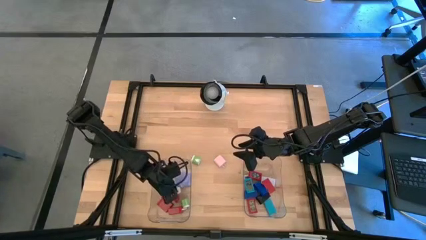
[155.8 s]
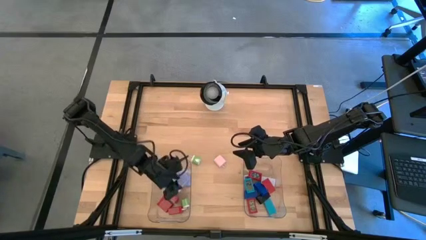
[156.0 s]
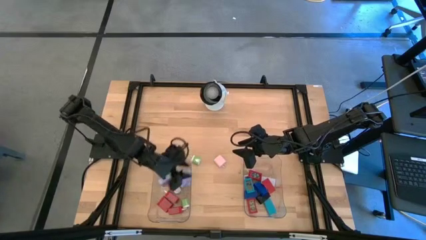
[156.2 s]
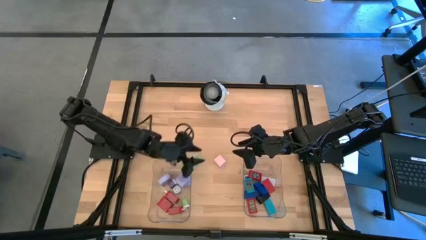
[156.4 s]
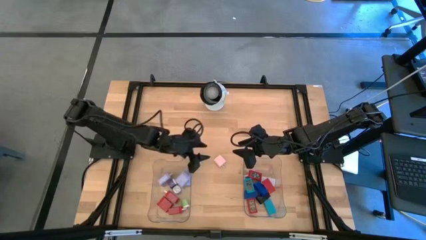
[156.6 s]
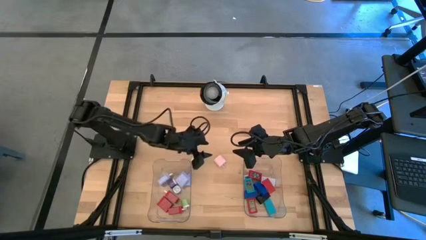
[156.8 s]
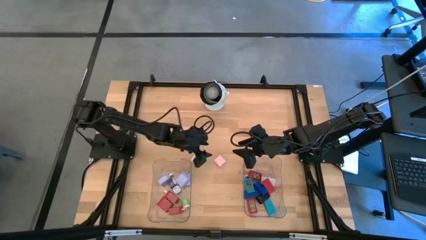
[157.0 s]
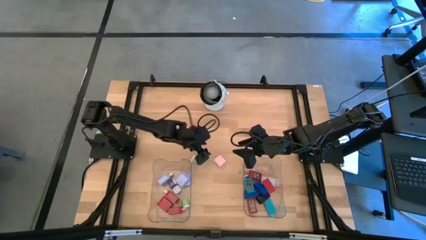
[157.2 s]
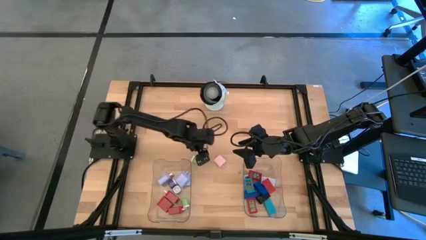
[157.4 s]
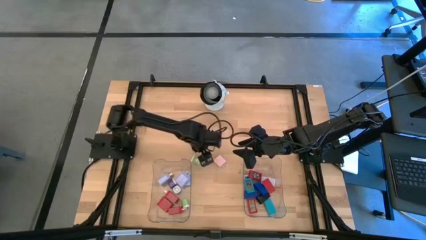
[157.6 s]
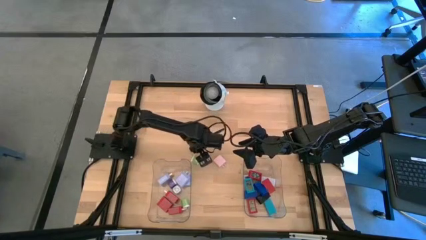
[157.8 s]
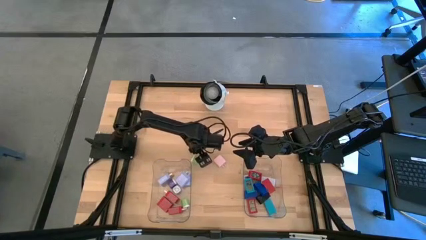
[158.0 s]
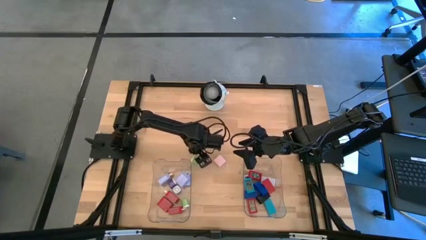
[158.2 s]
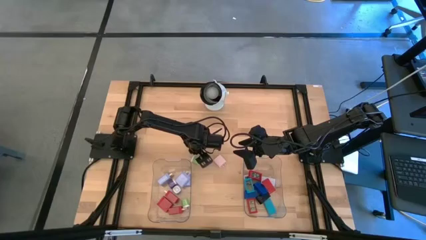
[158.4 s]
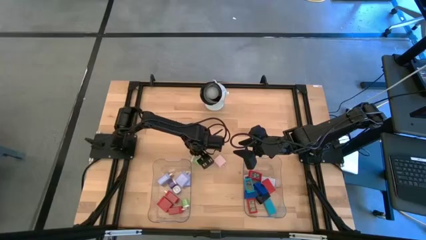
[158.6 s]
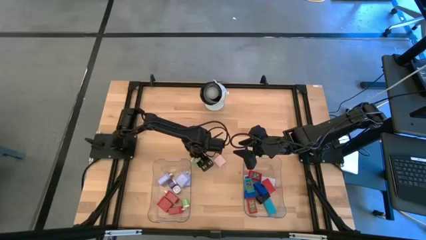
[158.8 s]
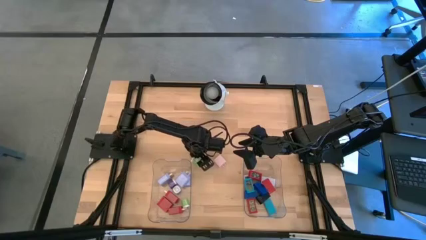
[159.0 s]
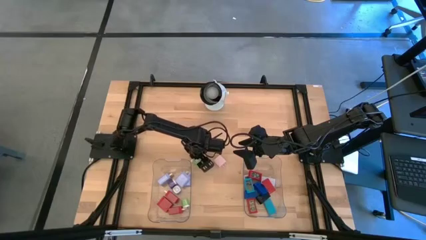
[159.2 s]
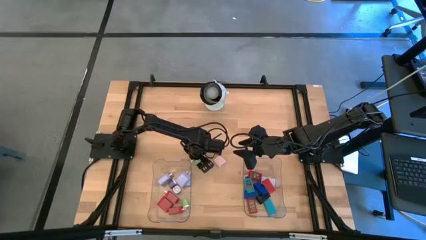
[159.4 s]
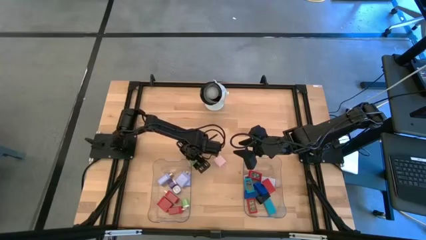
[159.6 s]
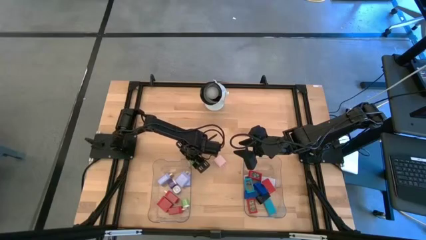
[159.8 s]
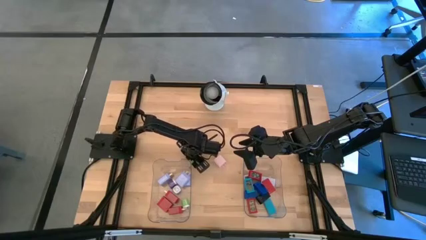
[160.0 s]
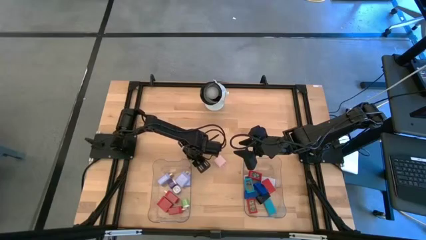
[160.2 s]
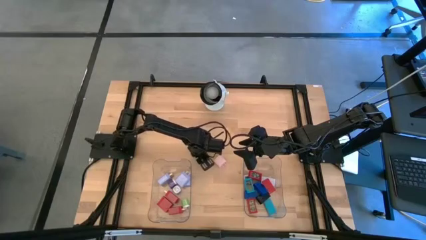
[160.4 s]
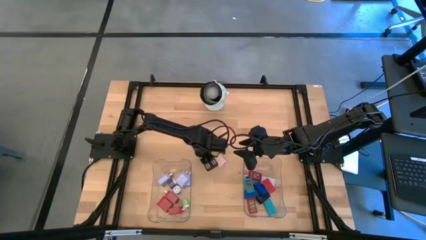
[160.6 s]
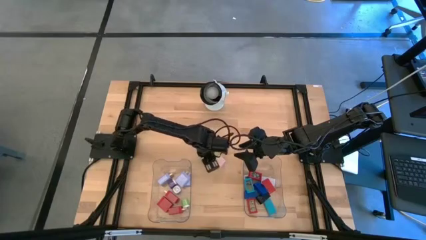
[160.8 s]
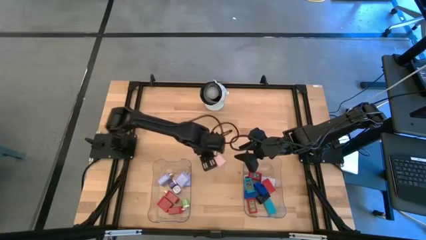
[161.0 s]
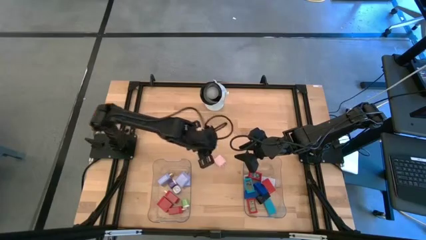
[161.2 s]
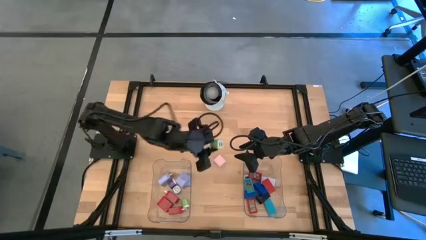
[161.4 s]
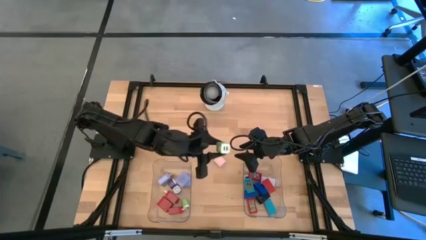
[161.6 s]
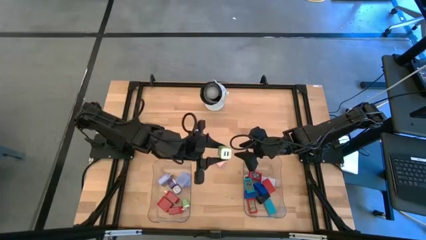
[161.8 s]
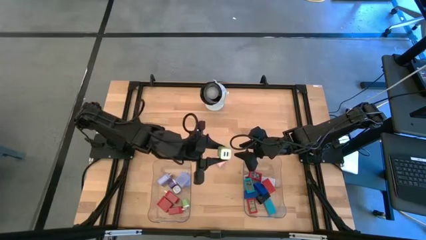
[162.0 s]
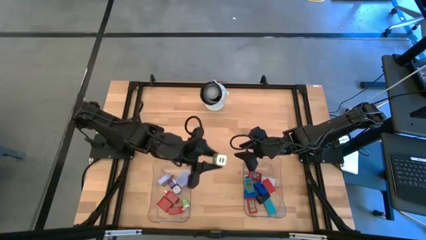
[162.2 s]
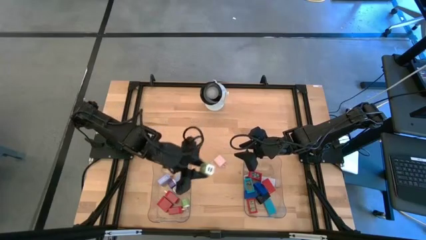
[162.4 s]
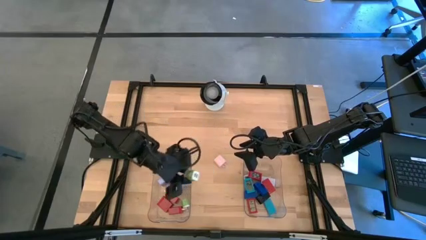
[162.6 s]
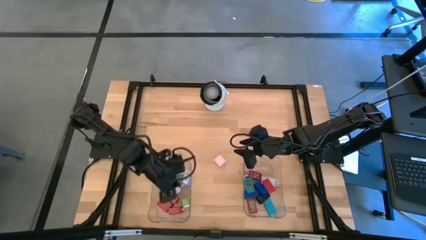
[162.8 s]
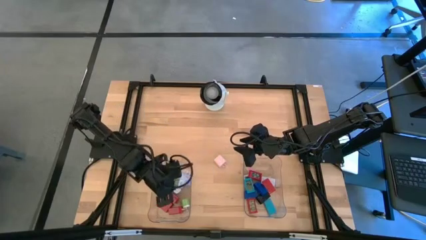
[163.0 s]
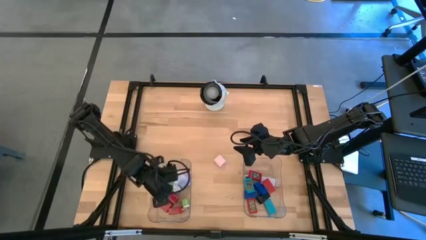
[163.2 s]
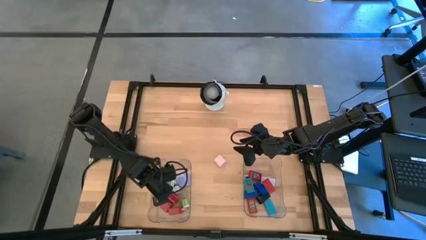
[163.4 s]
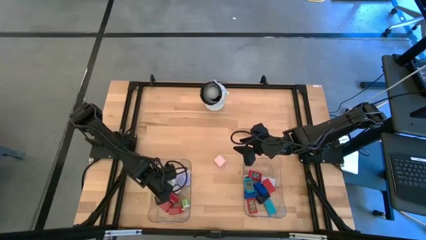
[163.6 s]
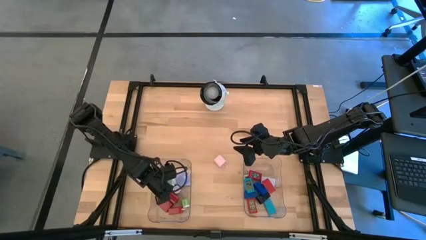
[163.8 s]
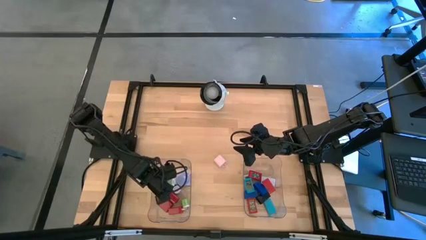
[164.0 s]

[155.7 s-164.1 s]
Task: Pick & Place Office items
Put the green charger adapter into the left transparent bin

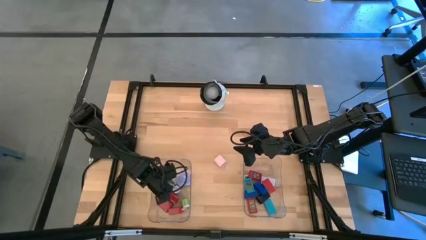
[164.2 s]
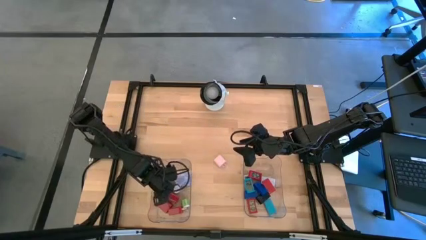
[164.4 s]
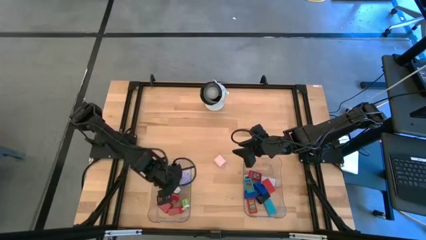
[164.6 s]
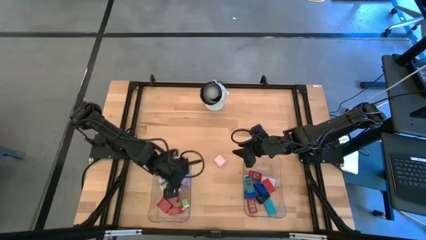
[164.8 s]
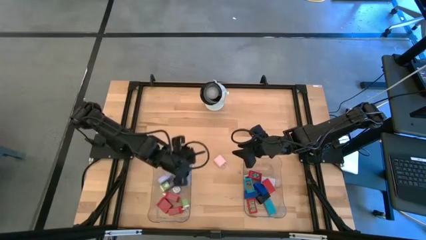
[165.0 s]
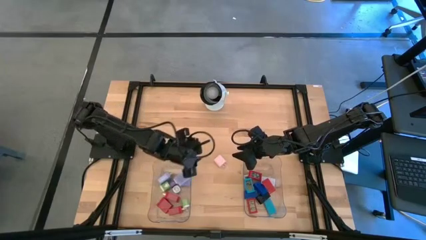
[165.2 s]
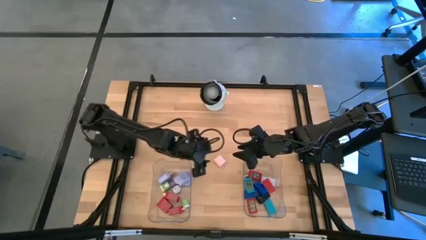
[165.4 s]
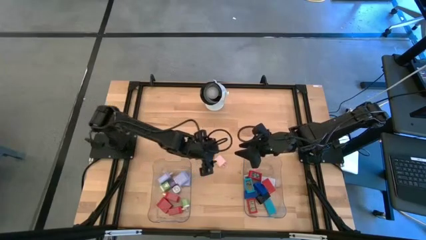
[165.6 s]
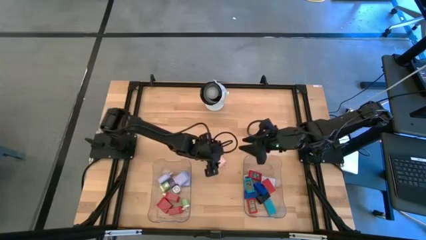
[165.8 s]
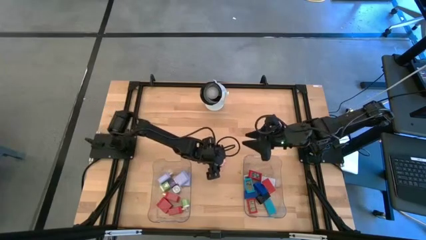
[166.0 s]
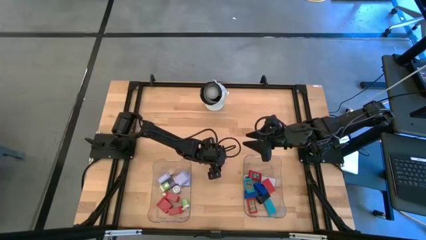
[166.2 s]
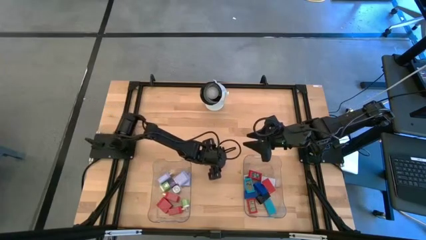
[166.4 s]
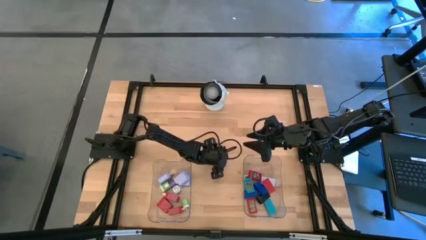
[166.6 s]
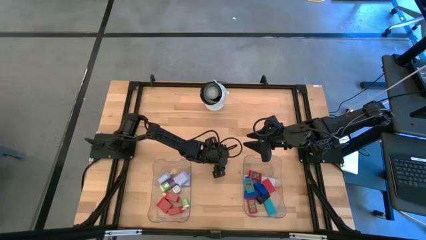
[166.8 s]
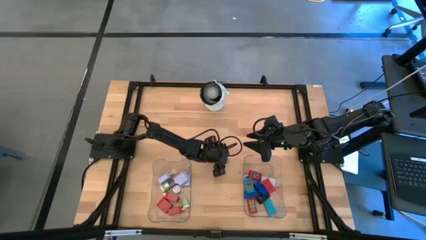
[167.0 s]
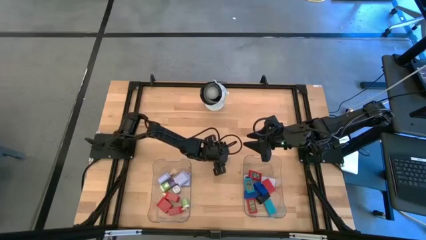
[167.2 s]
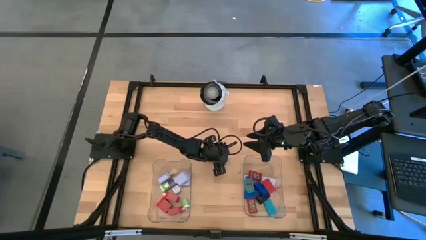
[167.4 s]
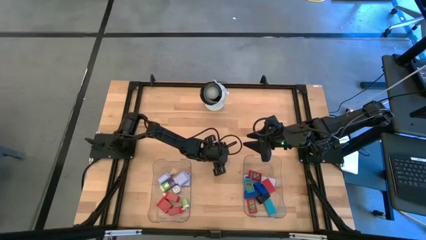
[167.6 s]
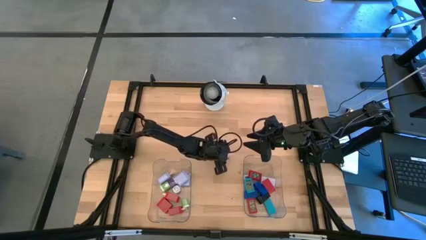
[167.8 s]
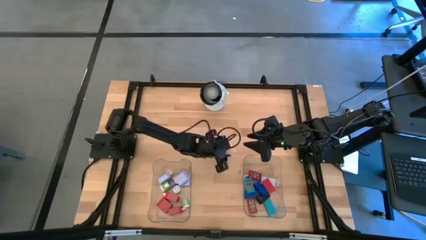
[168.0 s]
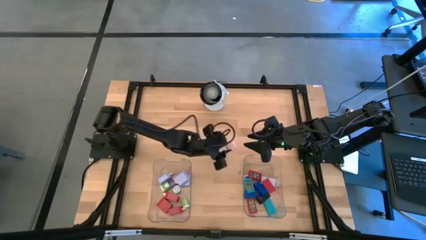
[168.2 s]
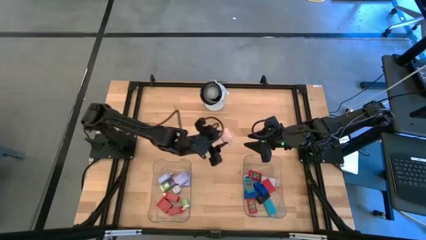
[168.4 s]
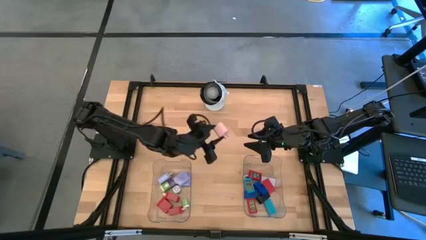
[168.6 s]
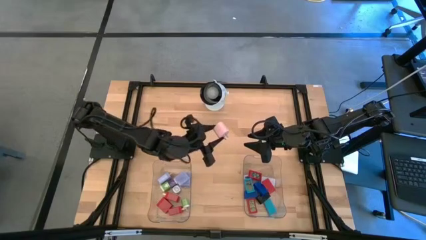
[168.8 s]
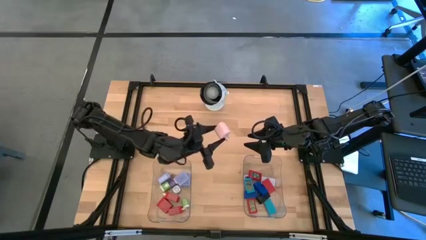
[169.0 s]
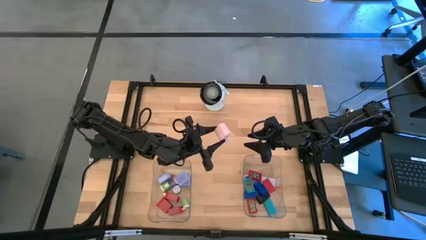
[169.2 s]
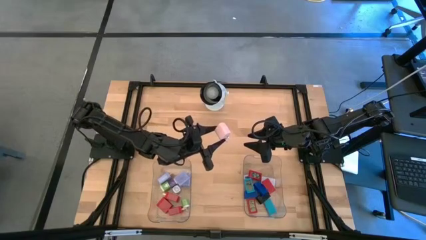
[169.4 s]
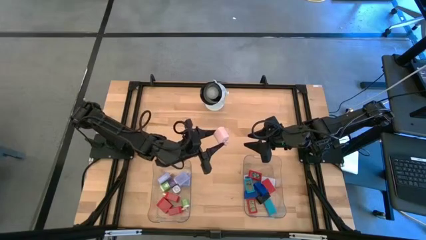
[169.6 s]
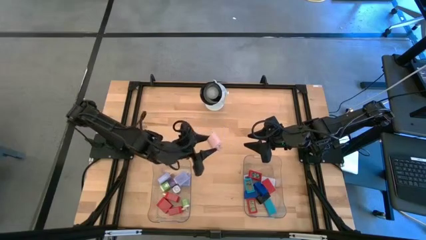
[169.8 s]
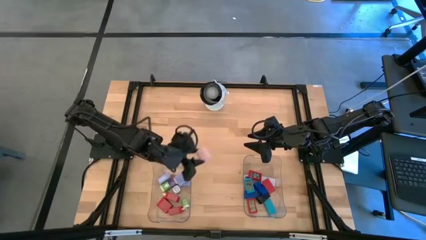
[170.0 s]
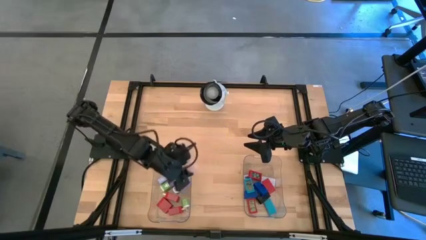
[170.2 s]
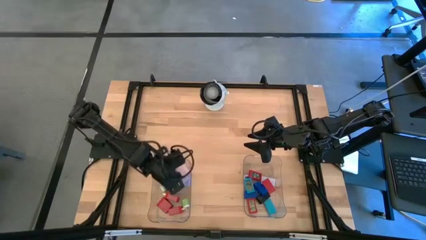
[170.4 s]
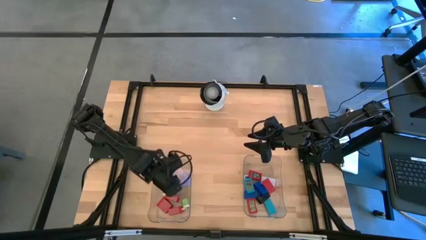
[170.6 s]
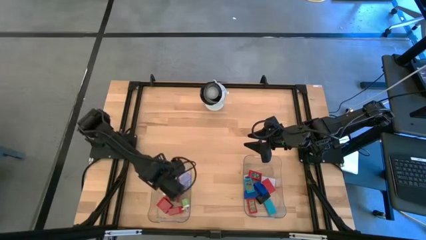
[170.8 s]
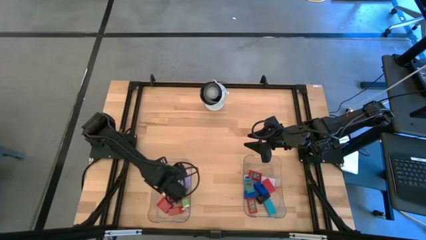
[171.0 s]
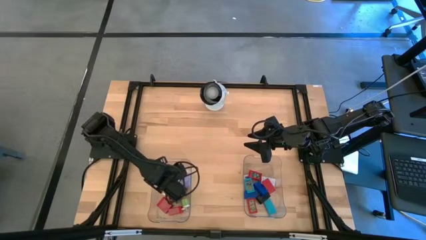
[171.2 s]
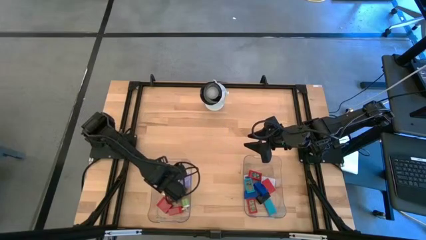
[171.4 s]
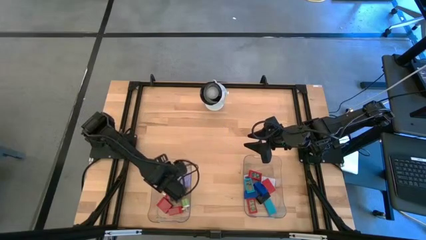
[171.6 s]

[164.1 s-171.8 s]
Put the pink charger adapter into the left transparent bin
